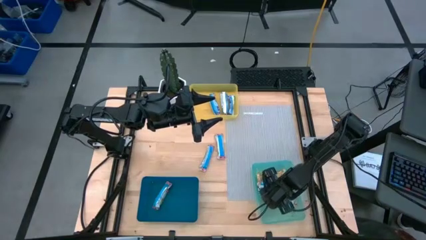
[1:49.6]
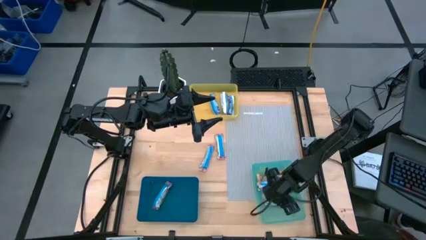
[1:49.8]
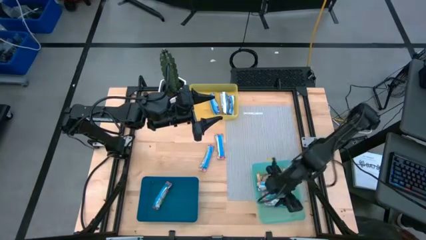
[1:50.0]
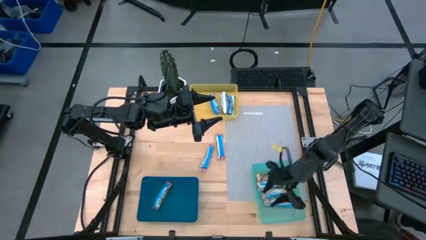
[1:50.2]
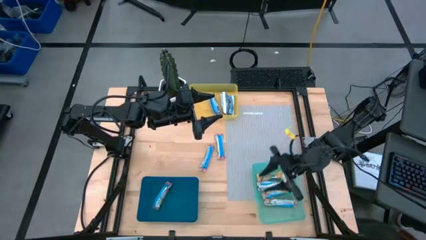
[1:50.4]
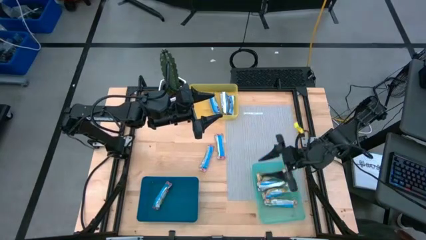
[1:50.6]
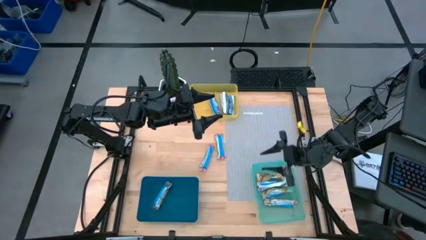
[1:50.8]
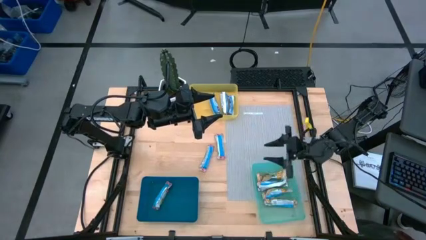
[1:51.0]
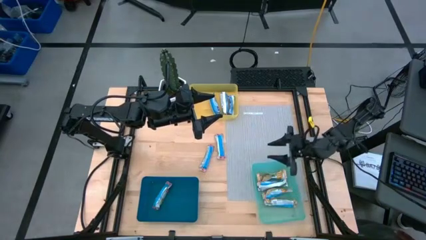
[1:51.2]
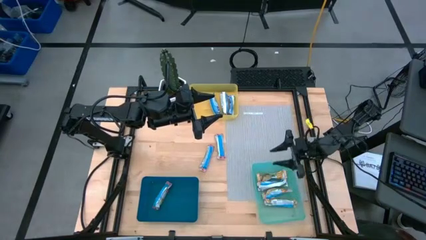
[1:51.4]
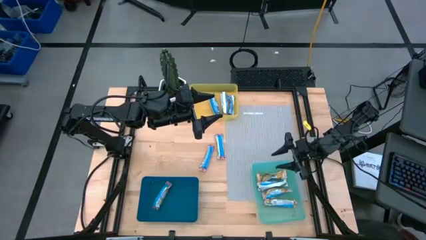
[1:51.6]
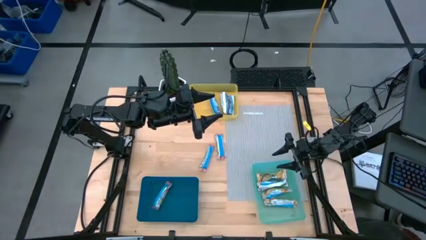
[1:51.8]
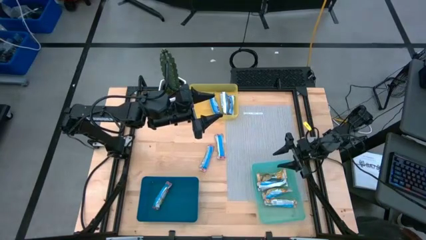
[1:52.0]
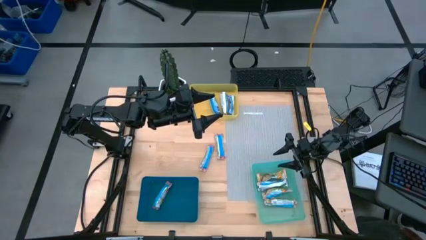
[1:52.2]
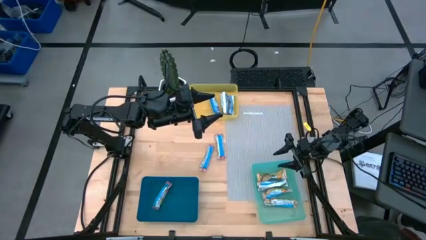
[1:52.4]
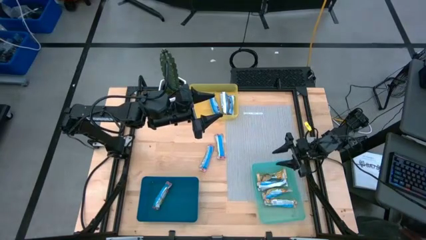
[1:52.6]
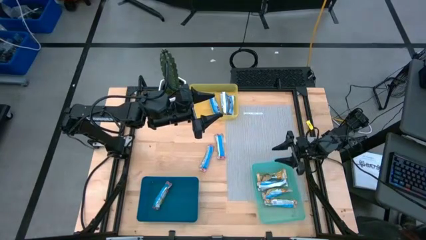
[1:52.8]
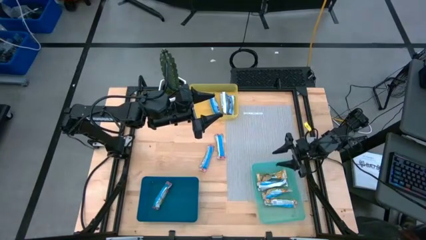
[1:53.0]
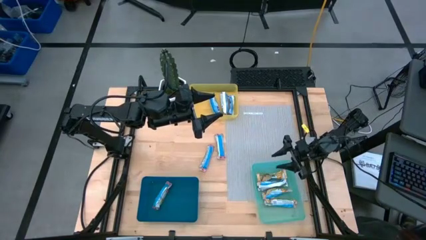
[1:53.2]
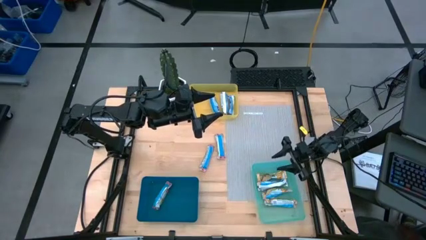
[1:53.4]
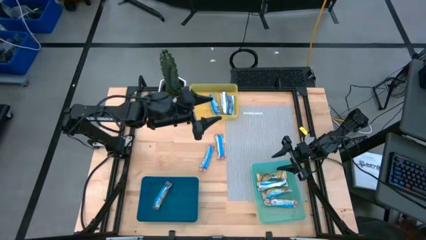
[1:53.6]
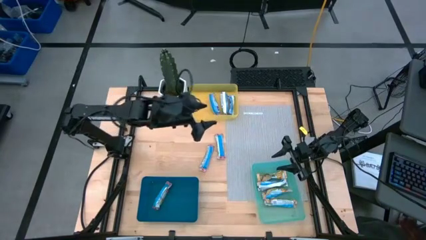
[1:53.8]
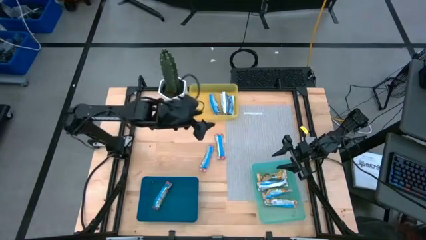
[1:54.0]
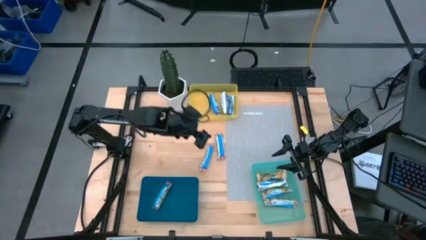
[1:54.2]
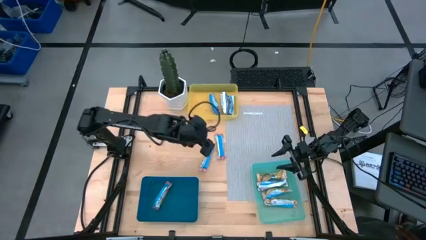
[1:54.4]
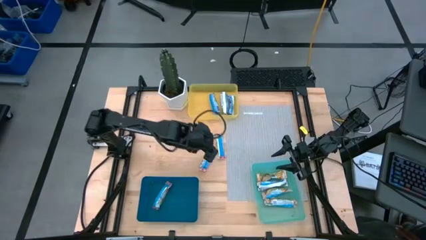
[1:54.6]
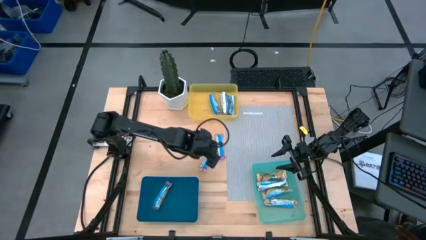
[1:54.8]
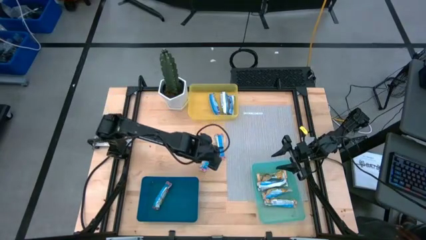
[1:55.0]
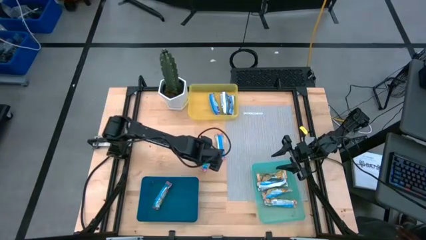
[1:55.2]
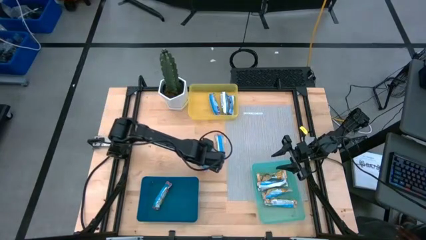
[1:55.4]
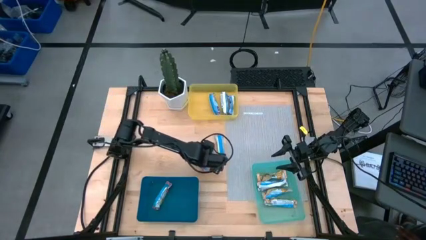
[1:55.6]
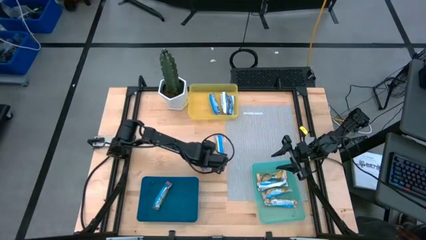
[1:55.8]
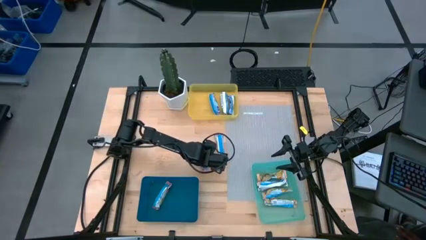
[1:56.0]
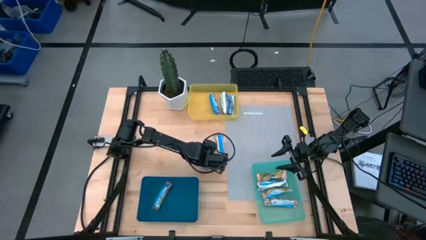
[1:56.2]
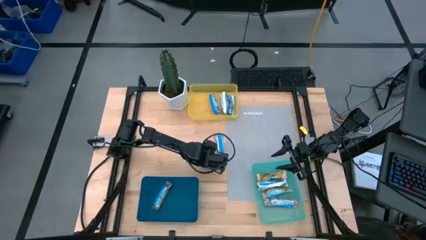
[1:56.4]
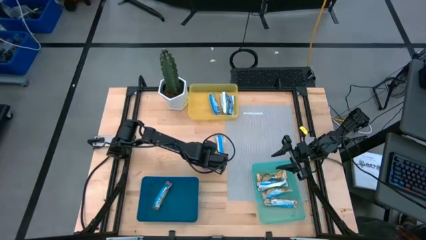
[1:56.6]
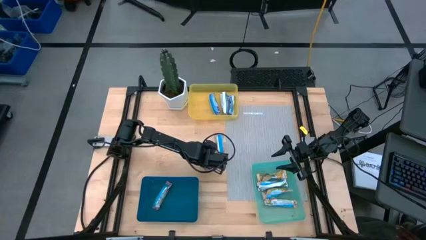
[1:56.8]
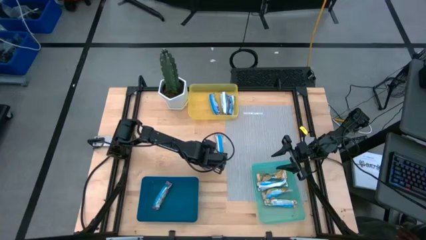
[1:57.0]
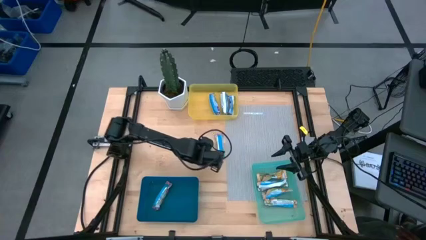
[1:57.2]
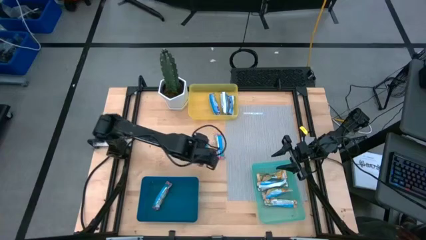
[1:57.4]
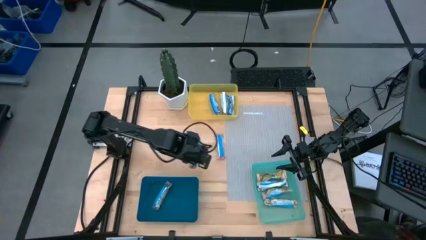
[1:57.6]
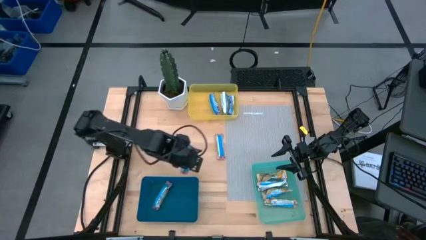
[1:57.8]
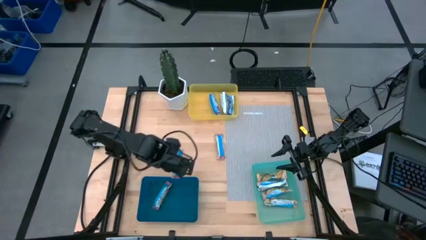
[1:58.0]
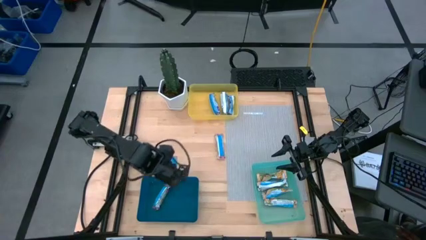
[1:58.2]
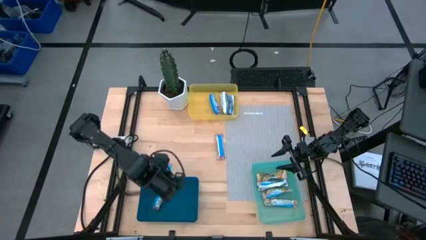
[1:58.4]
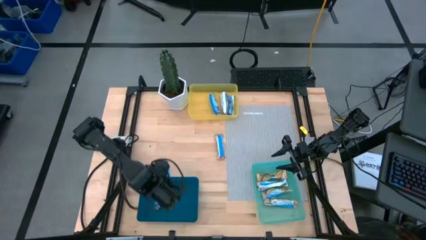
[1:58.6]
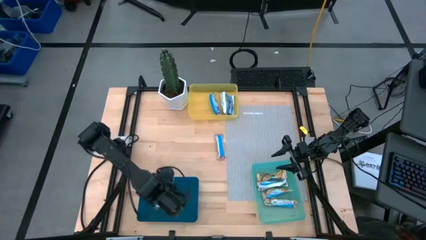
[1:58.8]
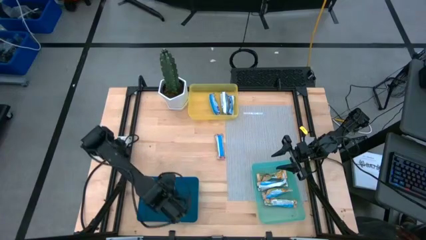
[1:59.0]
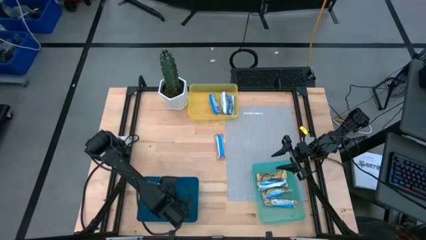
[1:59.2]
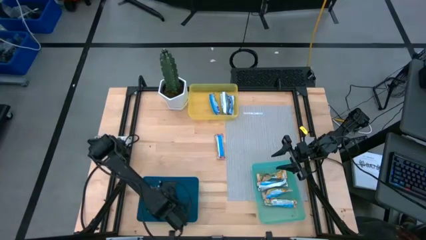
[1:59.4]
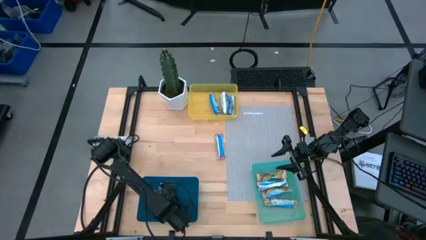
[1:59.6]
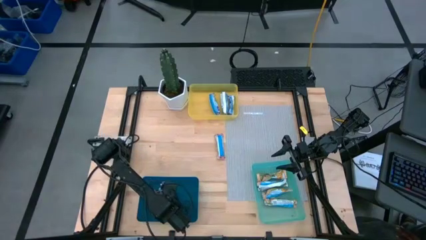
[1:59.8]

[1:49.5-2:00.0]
Task: Pick and place Granola Bars by type
Put the red granola bar into the blue bin

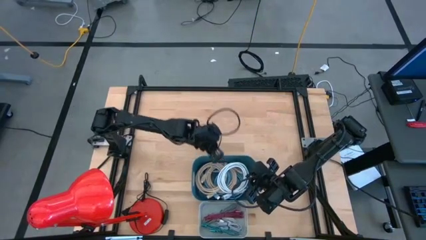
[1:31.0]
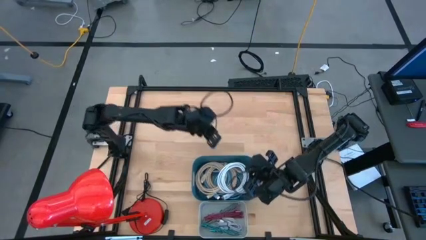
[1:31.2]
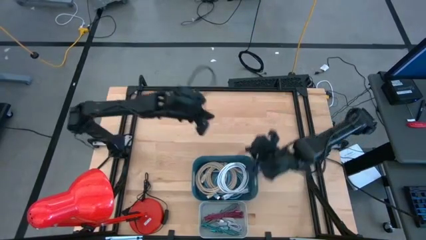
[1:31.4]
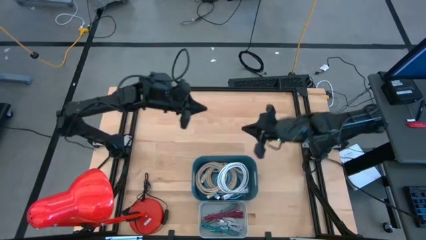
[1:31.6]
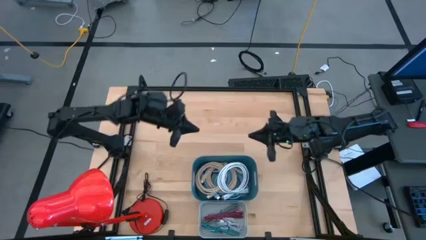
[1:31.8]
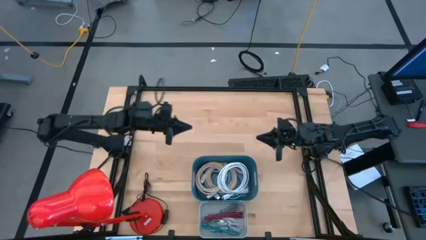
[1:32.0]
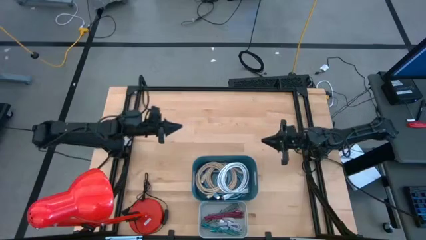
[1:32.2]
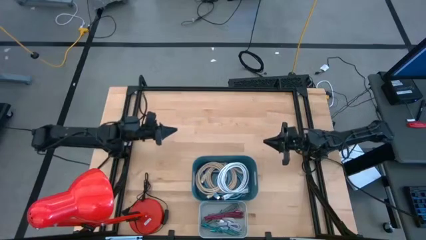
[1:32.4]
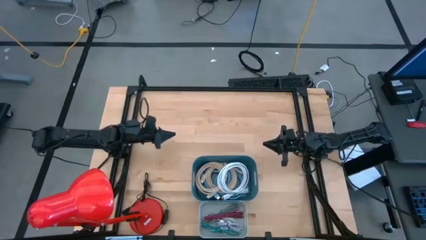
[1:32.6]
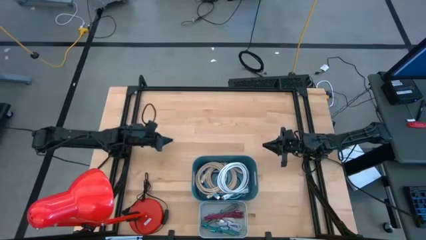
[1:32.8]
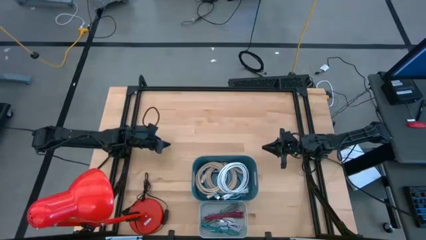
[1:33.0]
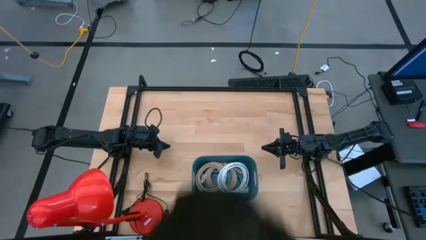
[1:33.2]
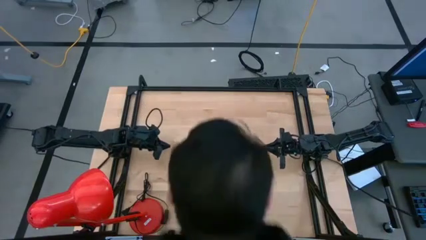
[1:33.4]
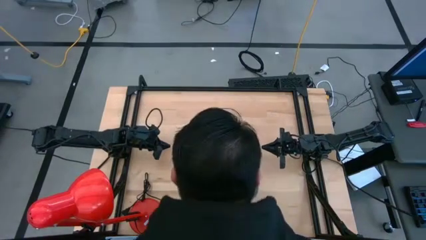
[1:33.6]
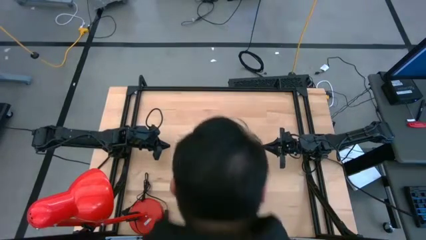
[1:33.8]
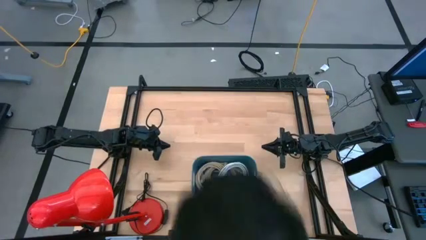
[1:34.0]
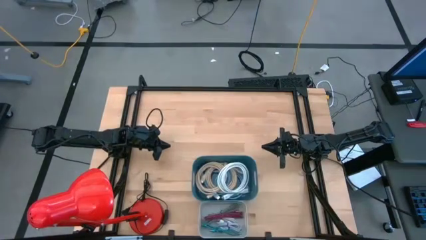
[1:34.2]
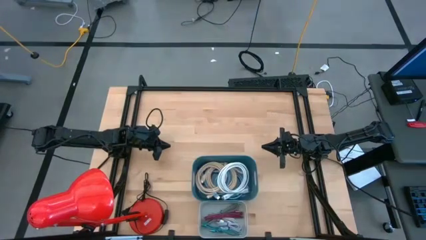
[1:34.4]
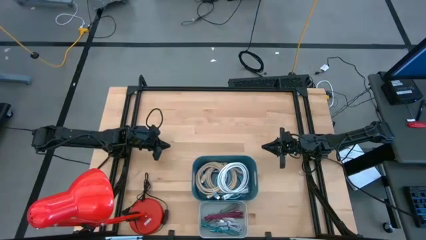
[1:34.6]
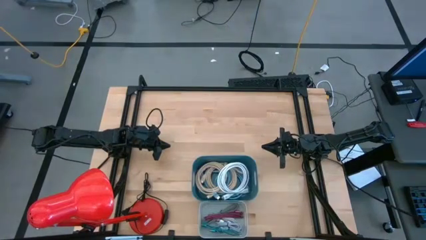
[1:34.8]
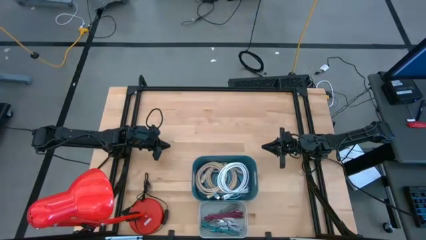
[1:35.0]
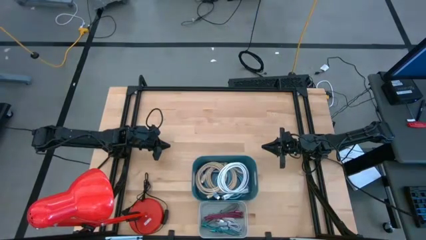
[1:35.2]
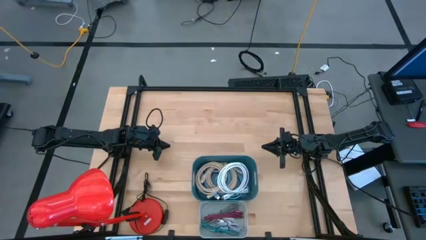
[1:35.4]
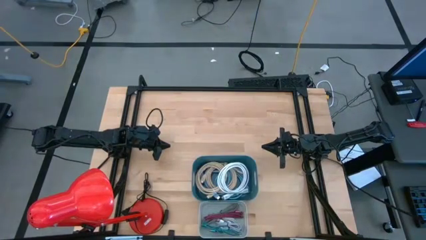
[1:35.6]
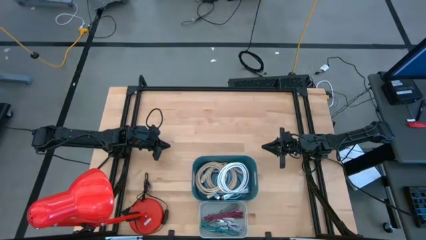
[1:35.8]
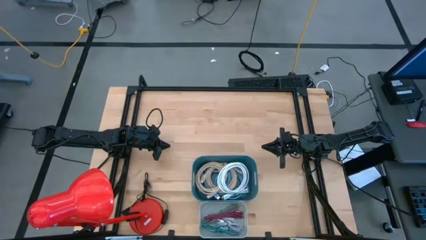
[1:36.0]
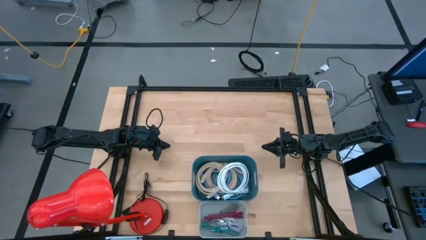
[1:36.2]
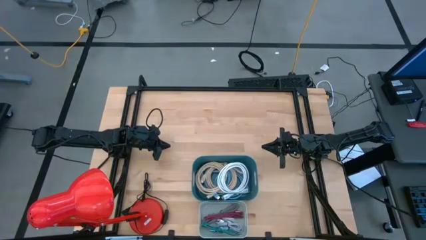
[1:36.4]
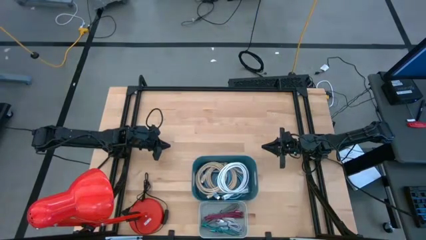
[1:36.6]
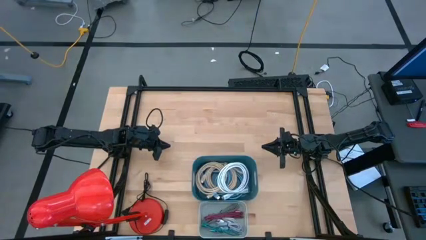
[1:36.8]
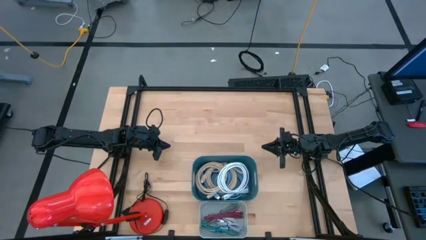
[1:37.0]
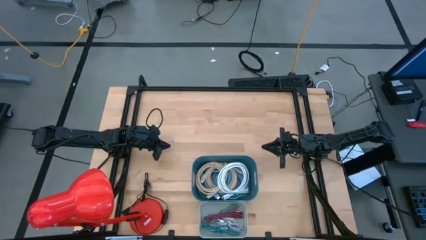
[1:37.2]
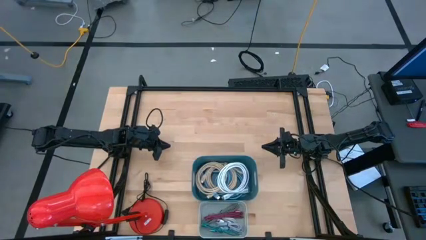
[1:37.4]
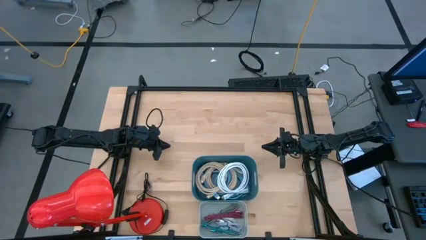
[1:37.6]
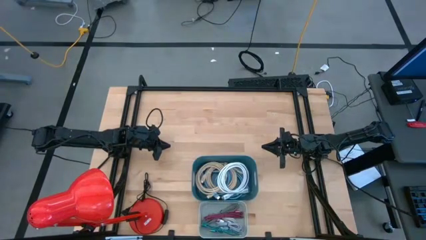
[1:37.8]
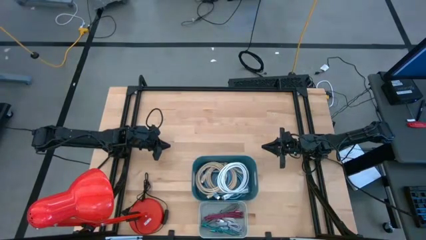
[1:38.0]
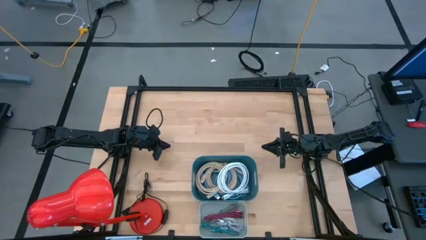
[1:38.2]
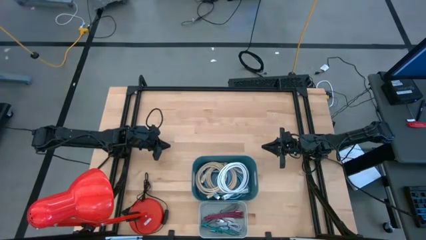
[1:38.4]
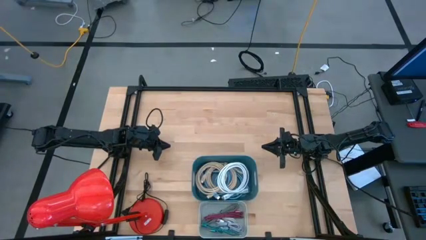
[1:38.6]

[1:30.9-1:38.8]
Task: Pick & Place USB Port
Return to Home Position
